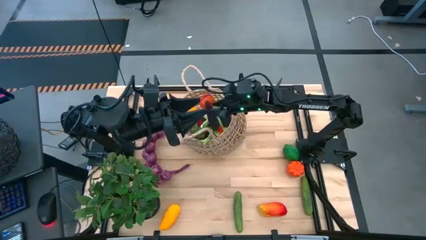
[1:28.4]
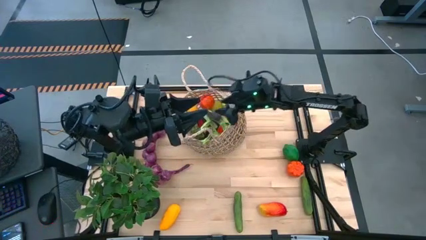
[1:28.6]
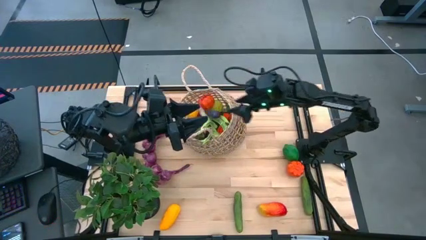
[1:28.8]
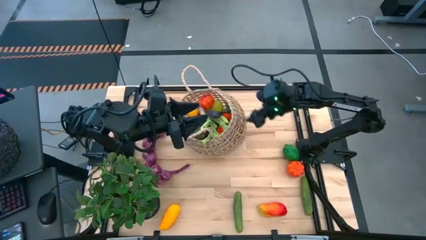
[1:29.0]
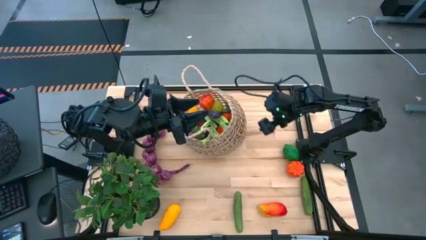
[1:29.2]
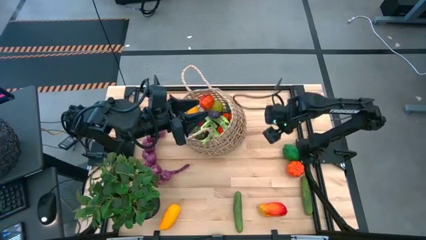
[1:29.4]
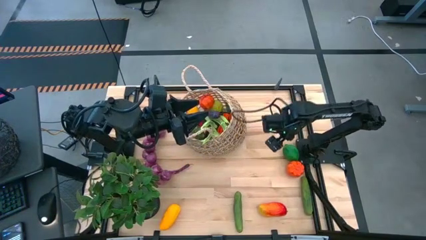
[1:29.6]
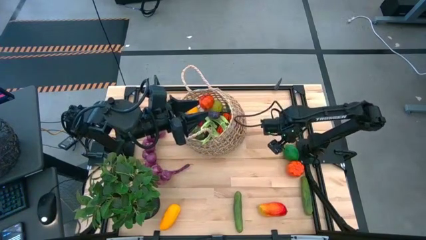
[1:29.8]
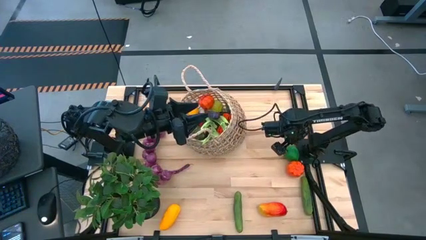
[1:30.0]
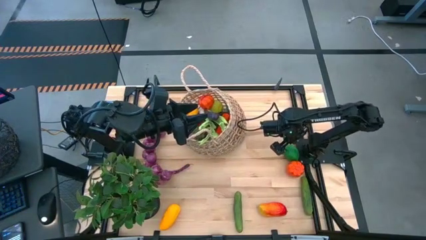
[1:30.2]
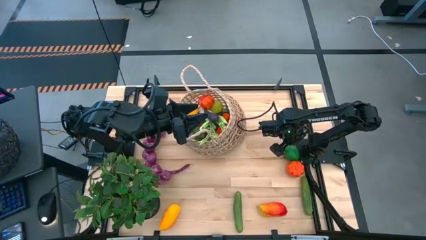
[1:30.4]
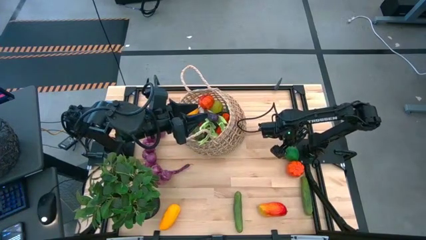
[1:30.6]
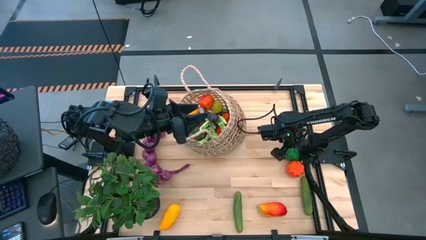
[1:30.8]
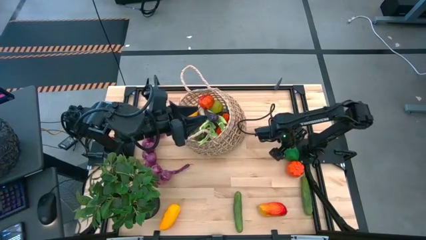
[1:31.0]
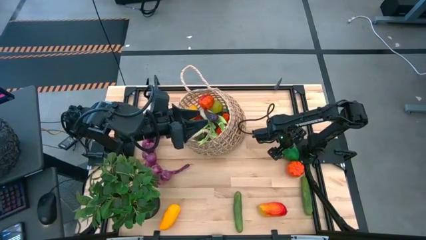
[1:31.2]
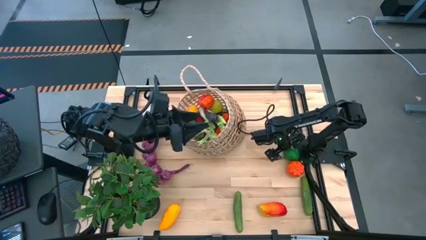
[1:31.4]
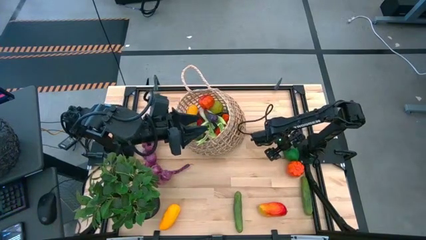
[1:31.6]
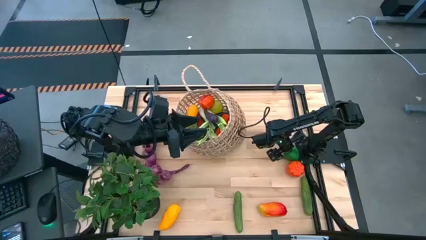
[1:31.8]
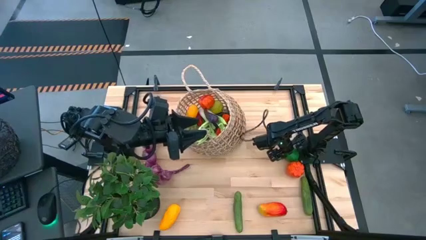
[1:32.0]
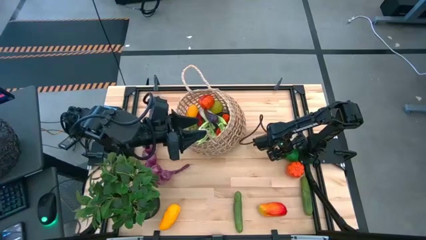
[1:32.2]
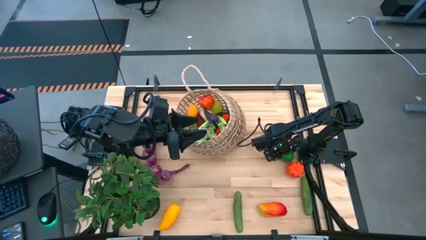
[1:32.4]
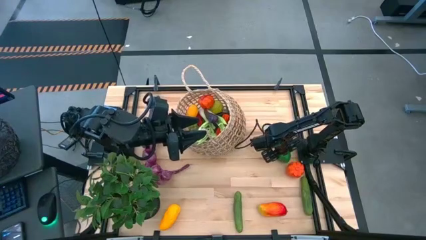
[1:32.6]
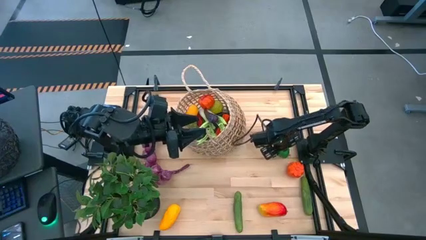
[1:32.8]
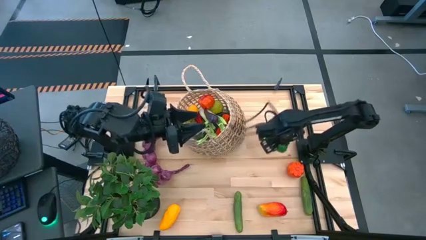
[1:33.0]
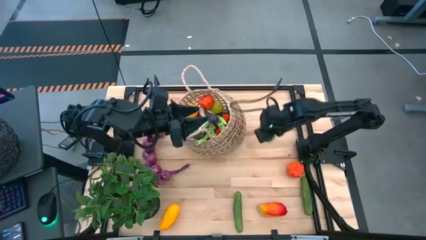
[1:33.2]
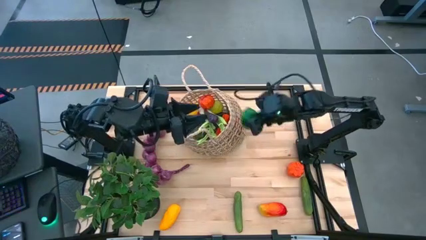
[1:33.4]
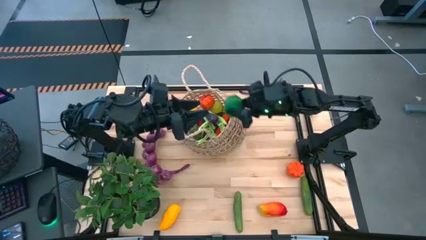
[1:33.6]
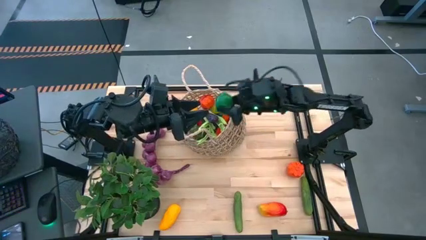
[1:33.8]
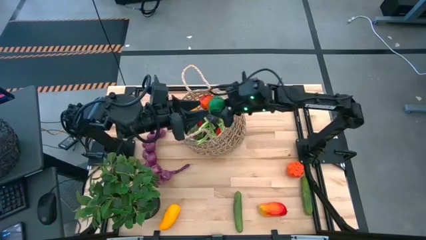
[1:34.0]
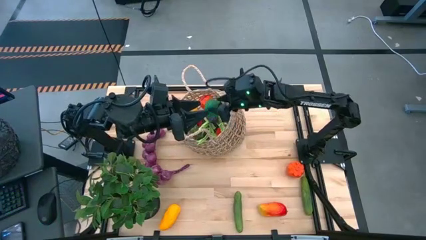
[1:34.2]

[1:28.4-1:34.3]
Task: Build produce basket
Put the lime into the brown basket

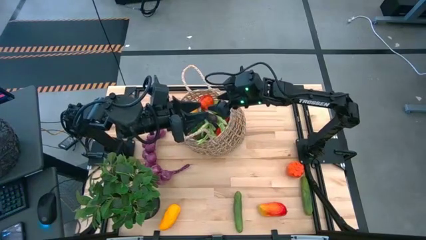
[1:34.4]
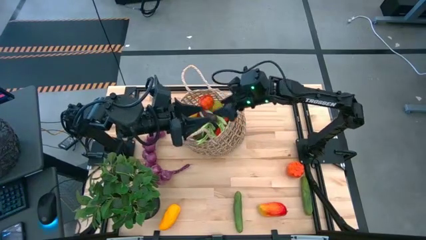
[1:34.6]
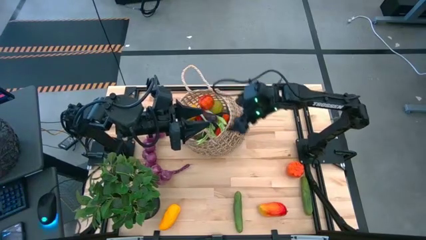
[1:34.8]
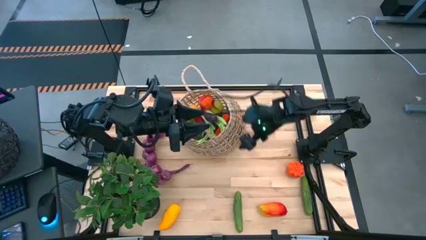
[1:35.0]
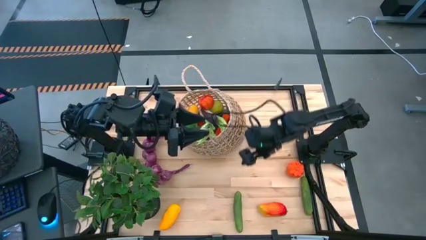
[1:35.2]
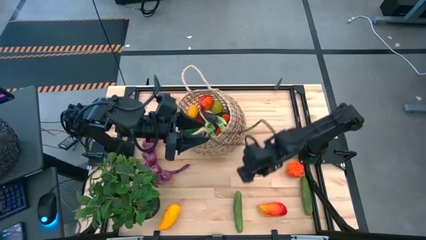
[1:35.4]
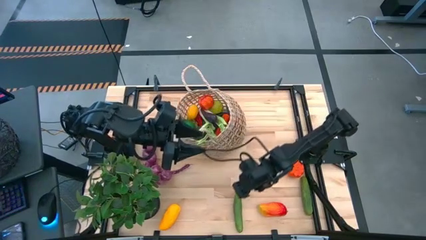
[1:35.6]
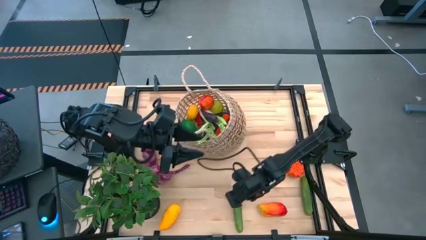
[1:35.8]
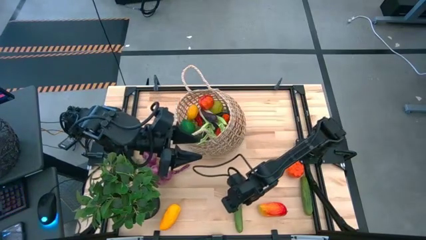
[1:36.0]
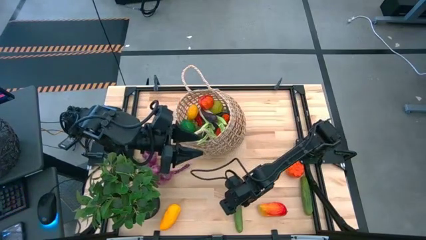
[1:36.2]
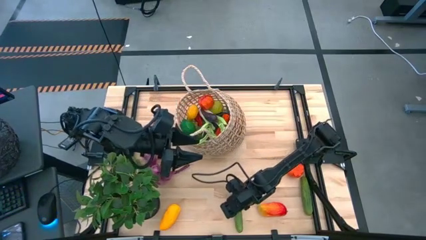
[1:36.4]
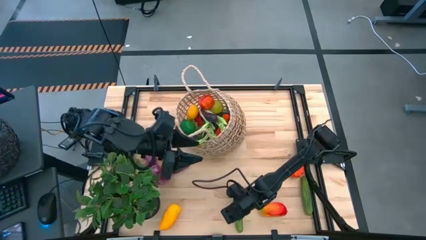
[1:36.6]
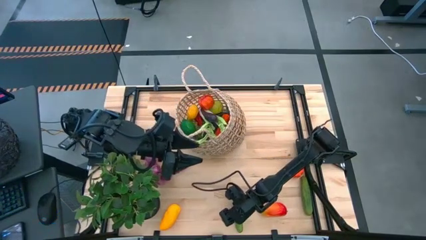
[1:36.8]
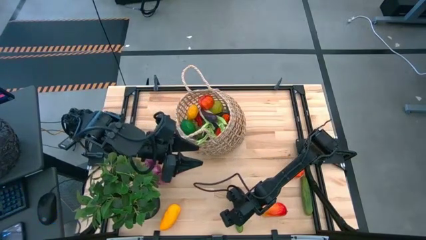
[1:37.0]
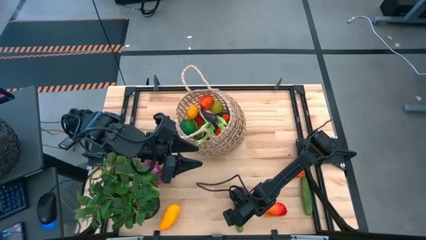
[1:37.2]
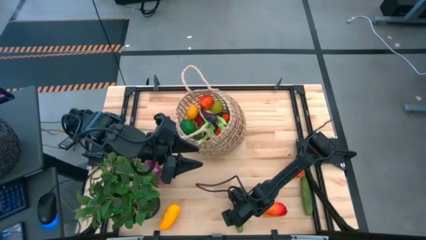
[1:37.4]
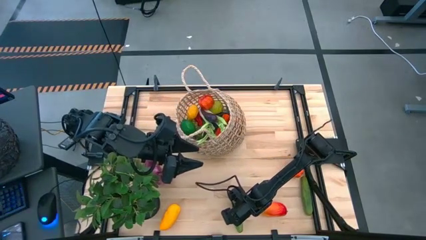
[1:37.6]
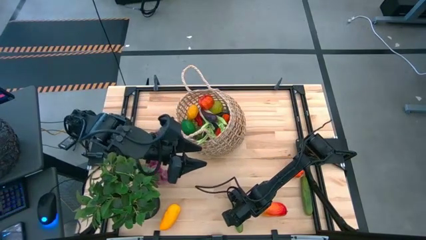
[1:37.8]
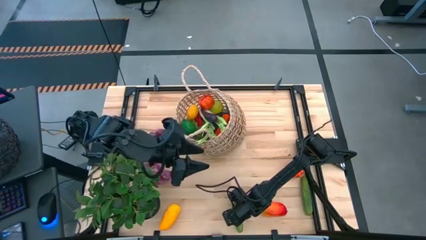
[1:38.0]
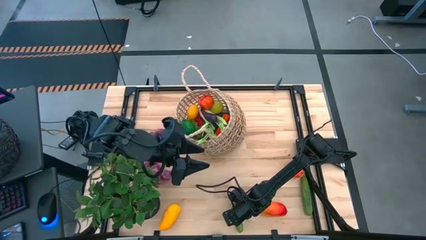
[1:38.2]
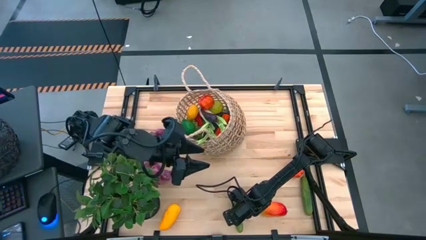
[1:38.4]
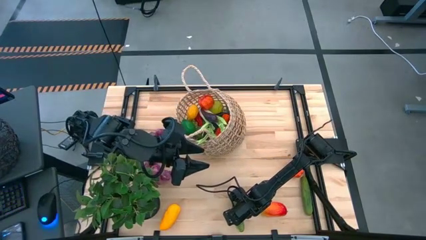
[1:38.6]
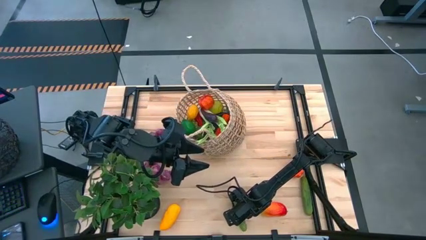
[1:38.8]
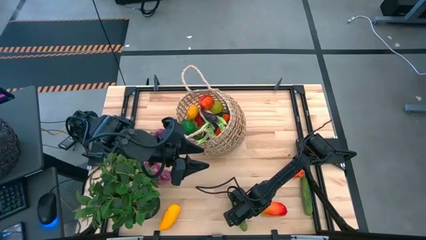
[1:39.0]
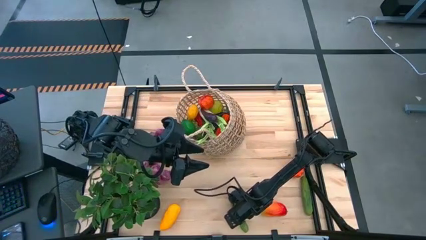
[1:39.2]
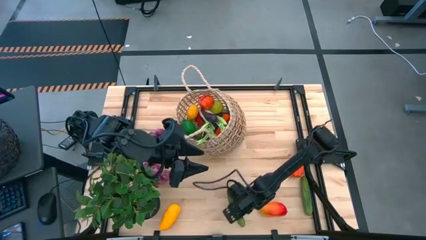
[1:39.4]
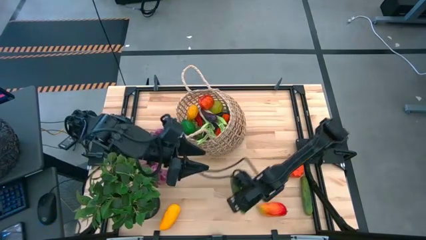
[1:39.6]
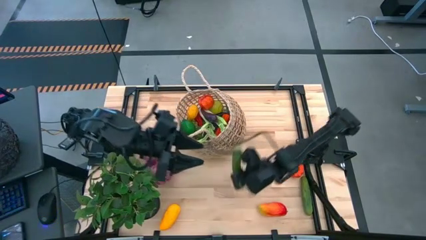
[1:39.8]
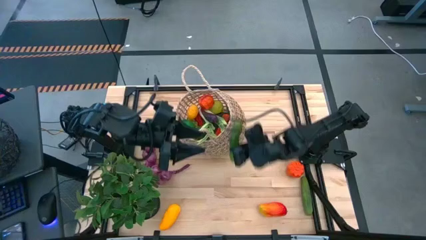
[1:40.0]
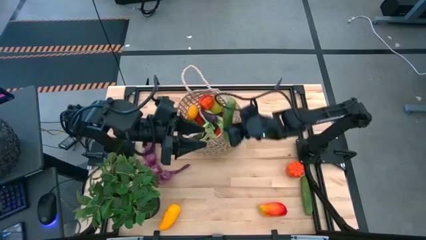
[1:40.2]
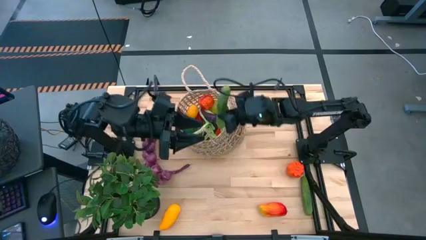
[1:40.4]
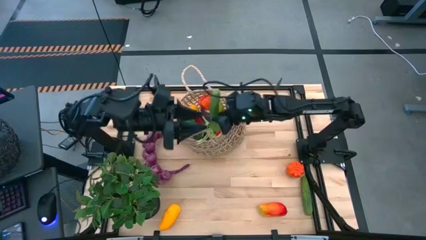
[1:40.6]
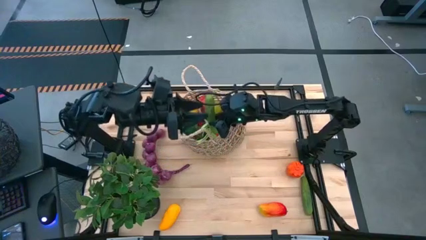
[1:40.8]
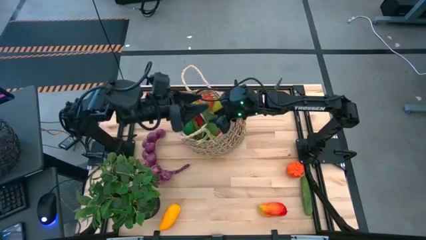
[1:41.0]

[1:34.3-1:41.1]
Put the left cucumber into the brown basket

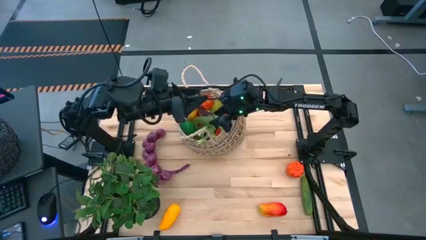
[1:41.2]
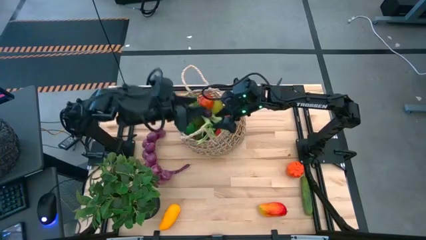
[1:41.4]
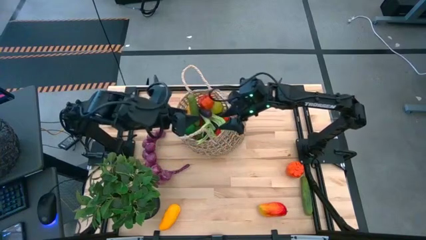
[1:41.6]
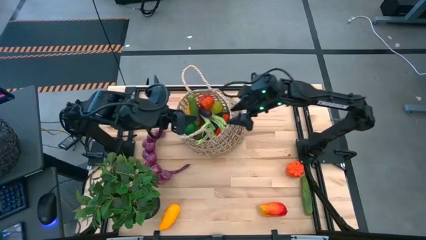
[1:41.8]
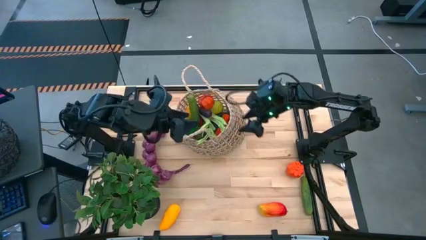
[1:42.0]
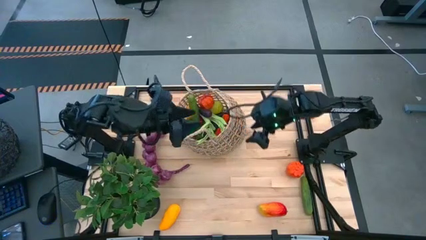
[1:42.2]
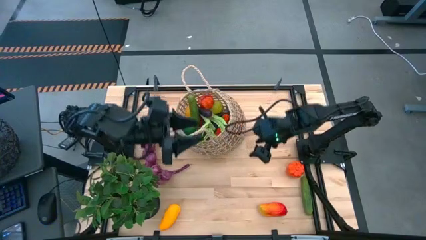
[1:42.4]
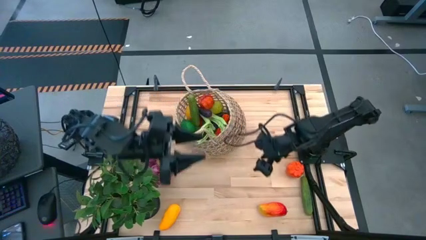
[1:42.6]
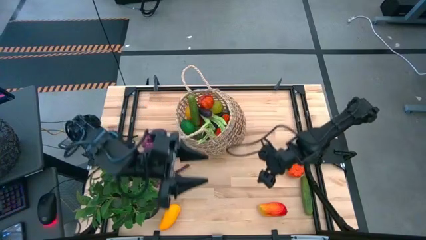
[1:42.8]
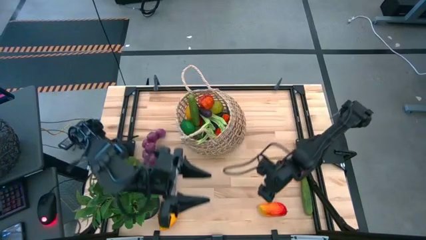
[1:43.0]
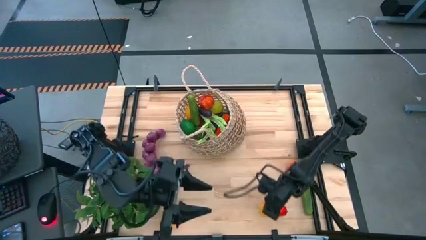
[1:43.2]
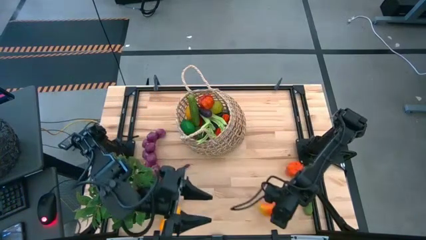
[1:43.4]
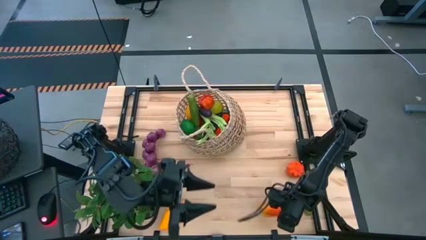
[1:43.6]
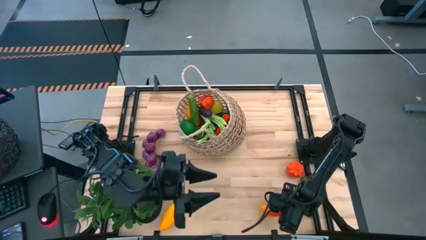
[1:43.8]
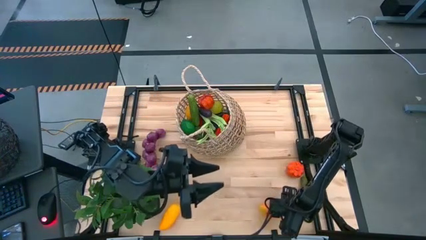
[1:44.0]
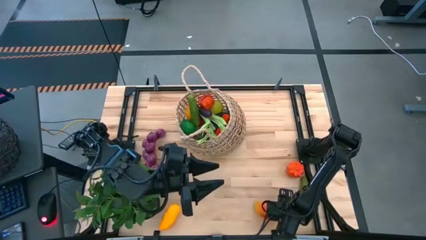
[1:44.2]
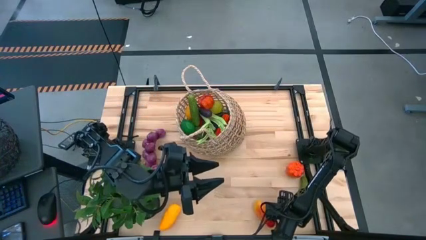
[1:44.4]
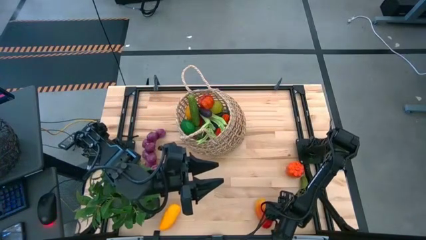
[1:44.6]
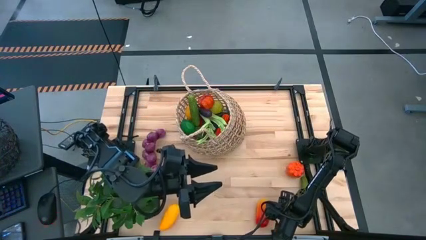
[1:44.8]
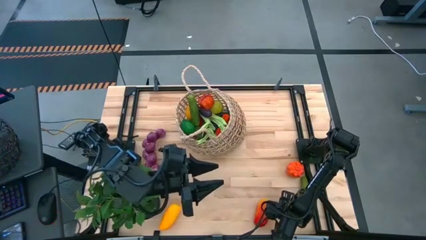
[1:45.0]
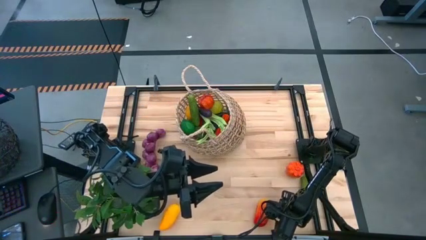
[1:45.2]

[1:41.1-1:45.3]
Put the orange mango into the brown basket
